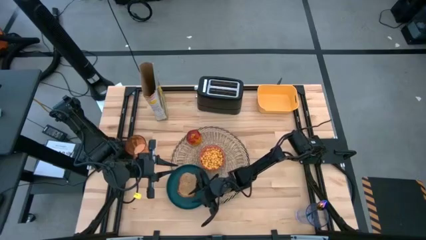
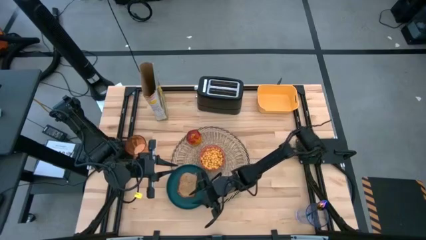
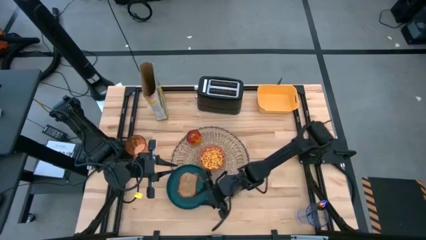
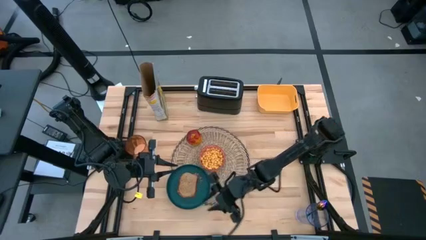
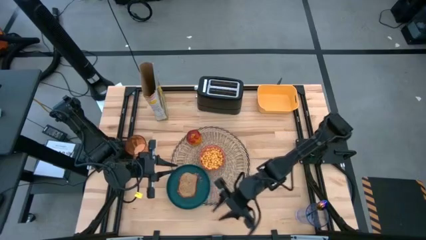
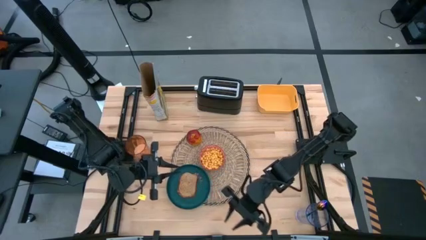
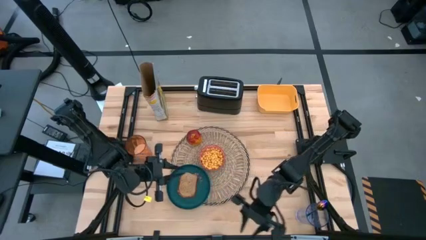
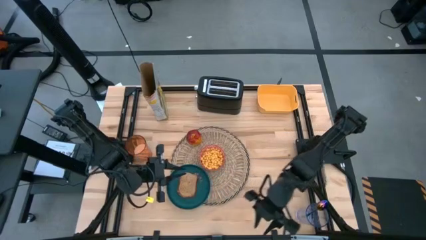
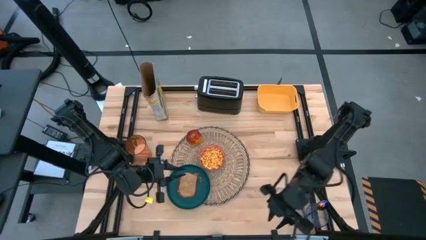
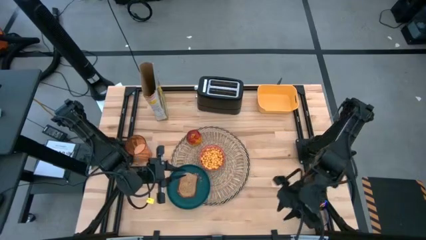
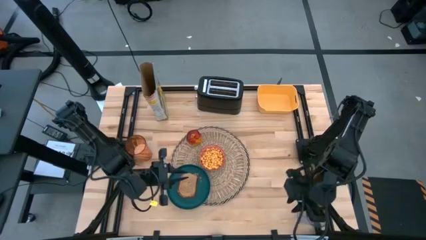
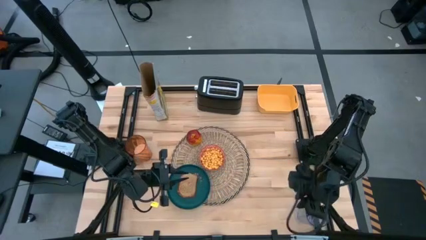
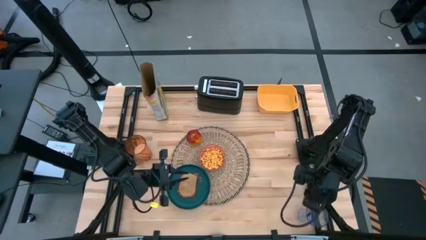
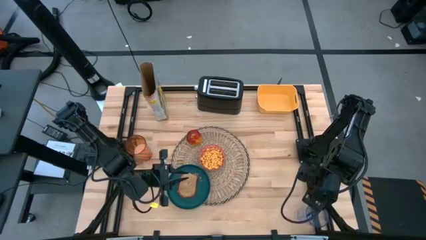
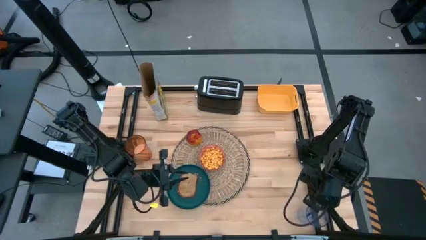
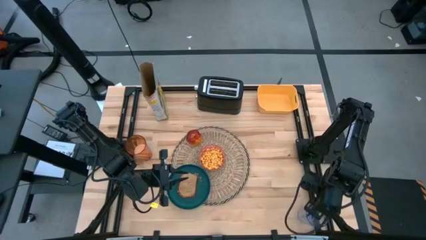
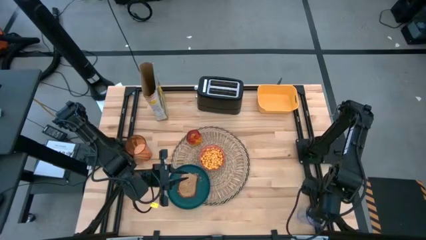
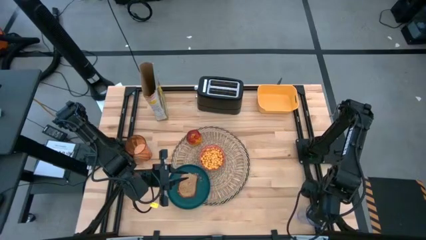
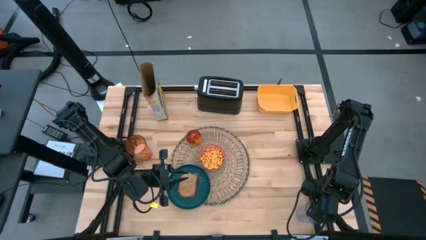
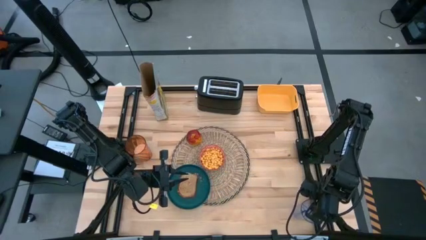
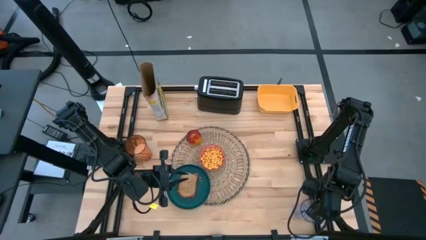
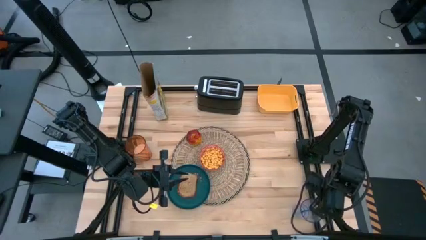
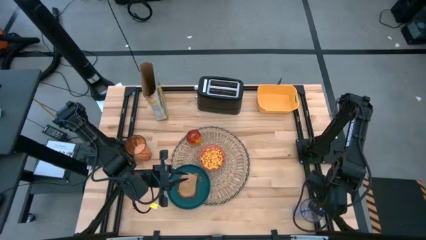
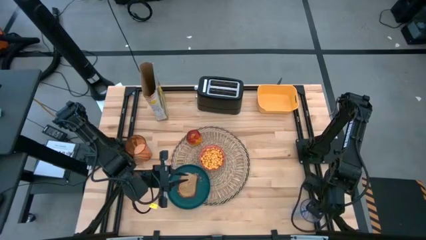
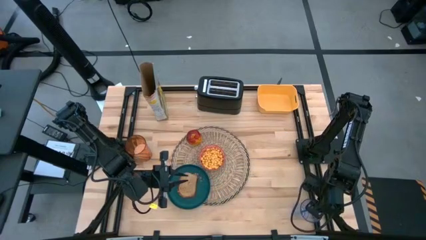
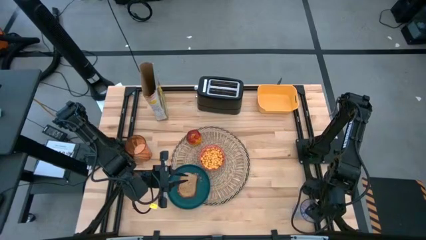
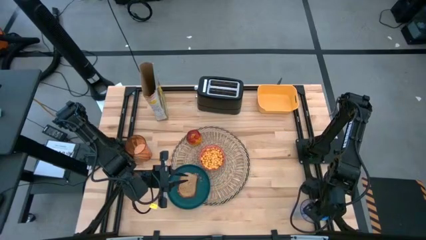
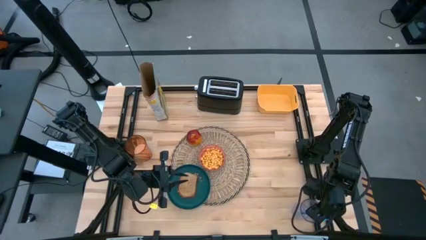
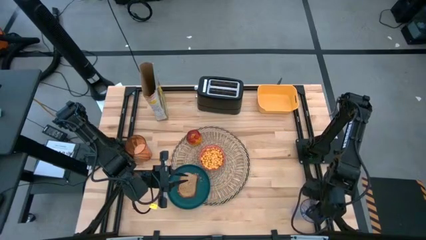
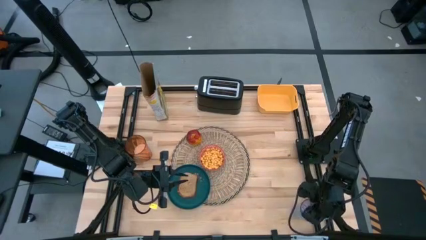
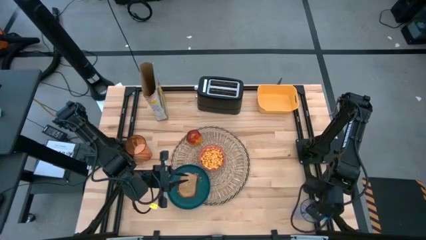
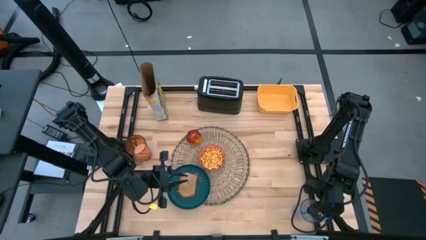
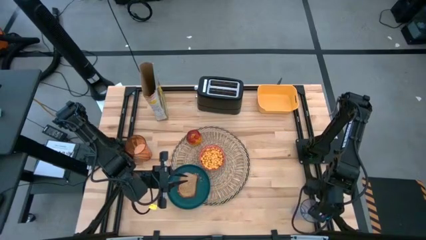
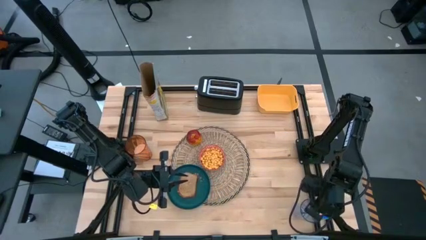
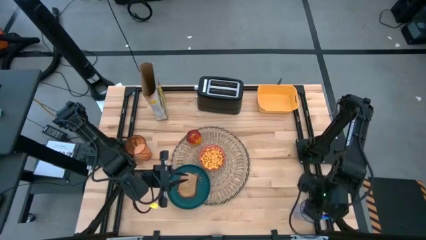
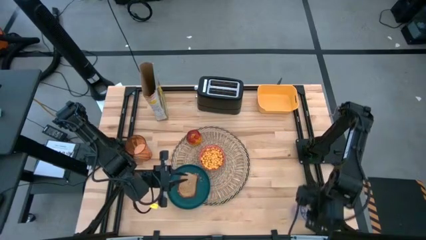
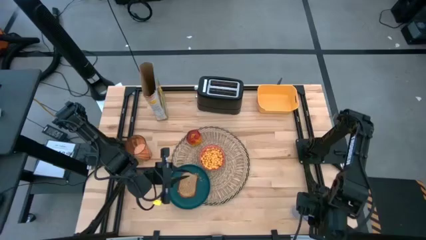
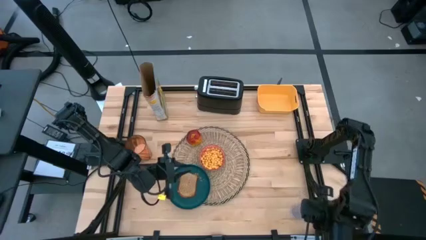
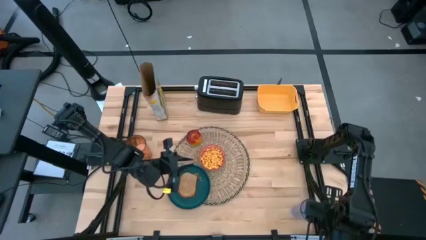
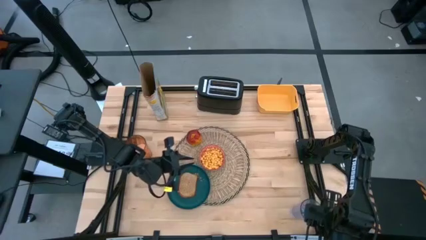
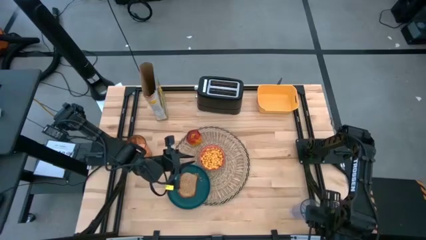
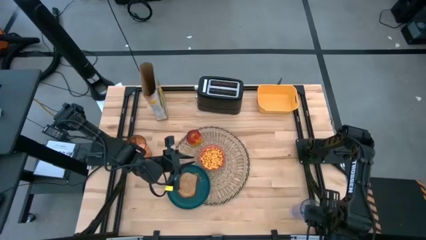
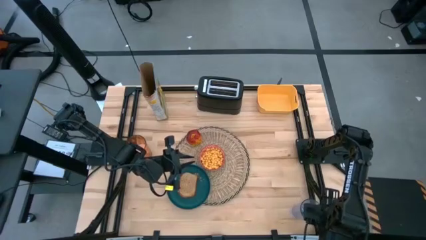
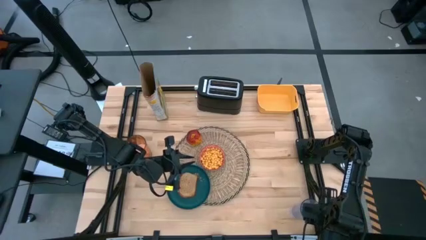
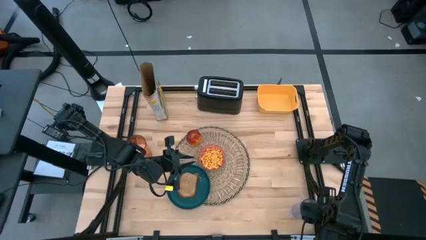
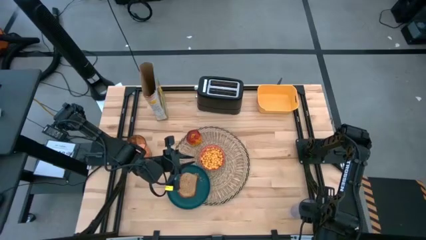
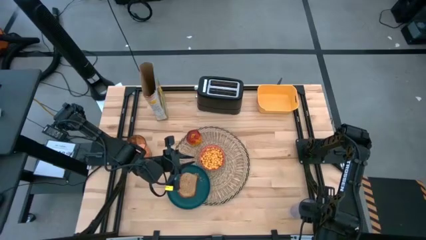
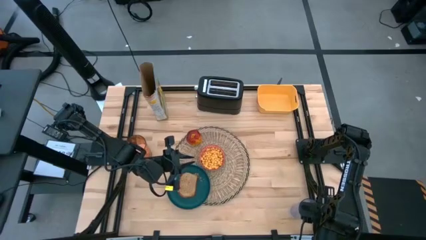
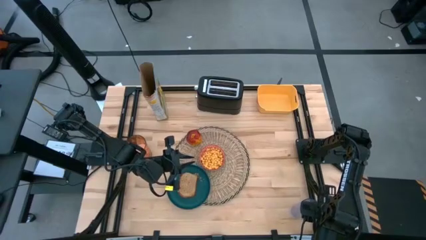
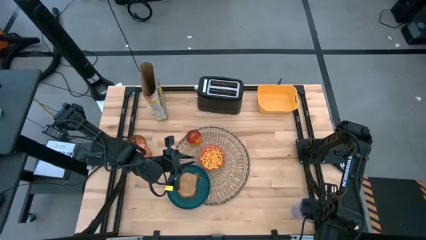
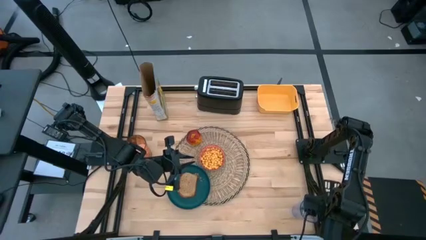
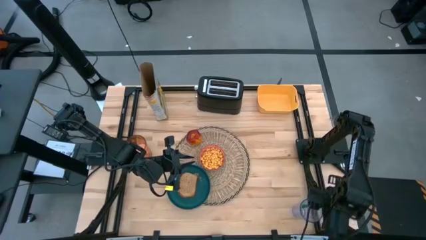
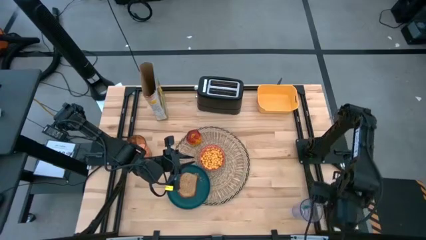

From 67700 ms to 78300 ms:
Task: Arrange a breakfast setting
Put the purple spoon on the brown placemat to the right of the red patterned bowl

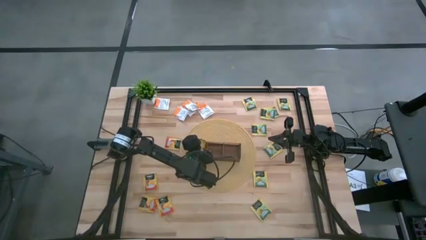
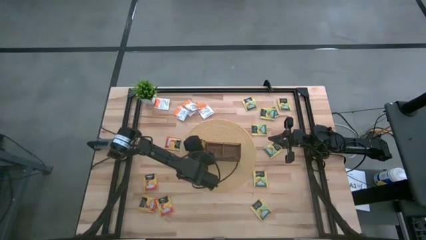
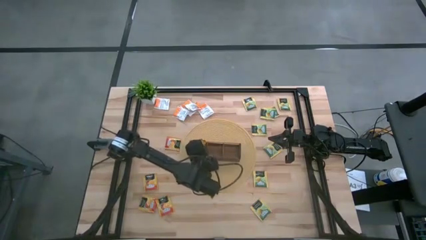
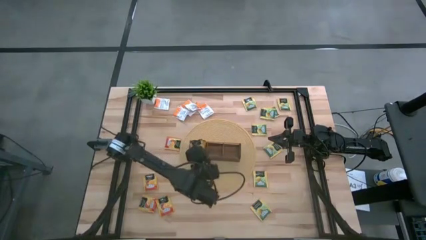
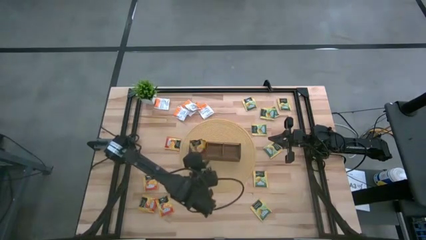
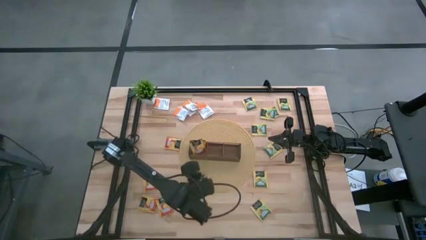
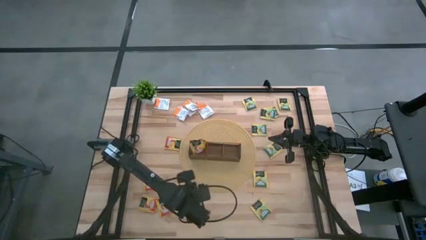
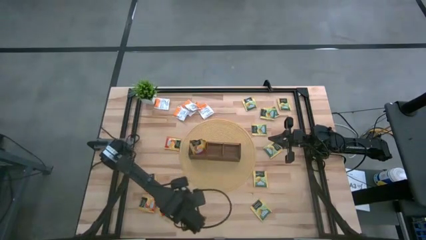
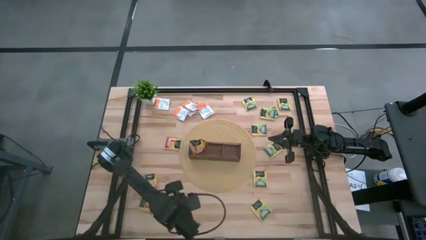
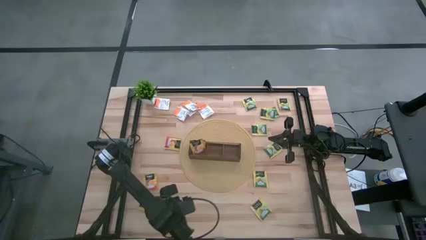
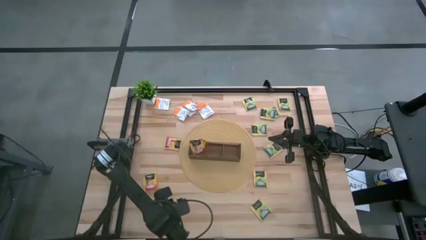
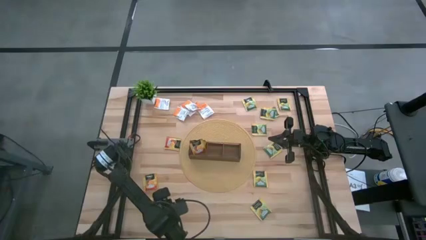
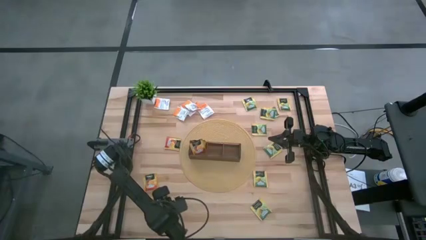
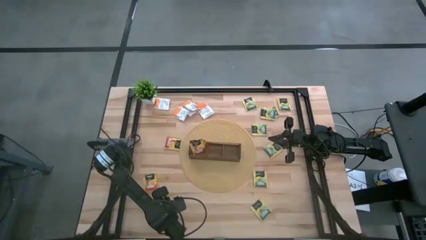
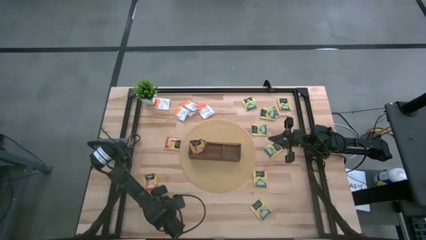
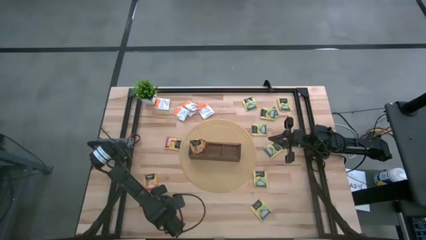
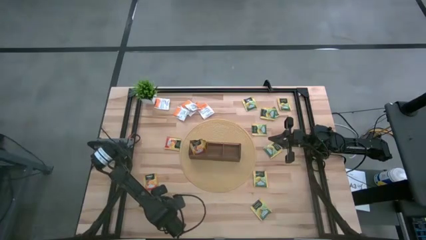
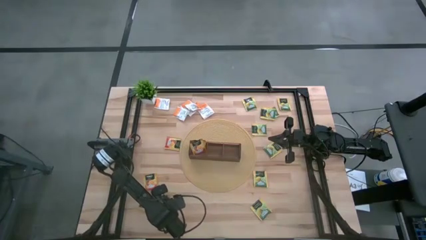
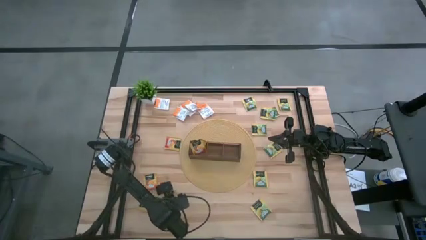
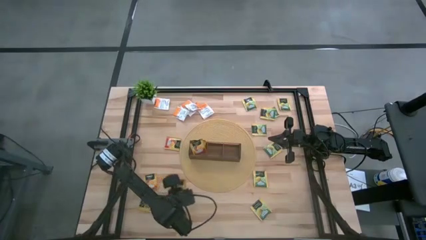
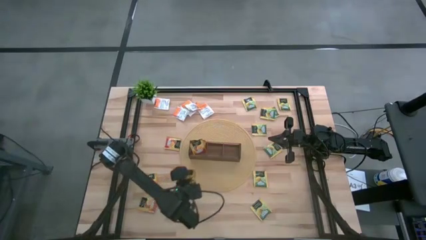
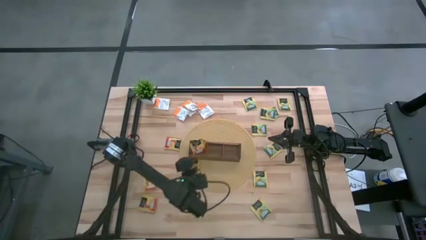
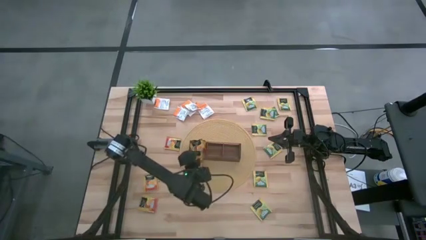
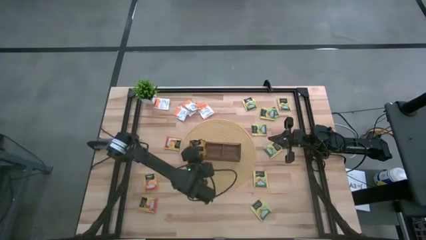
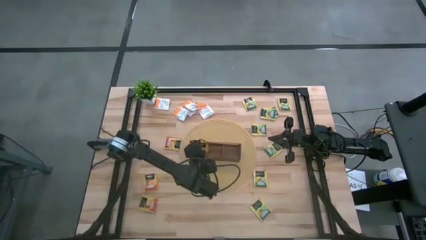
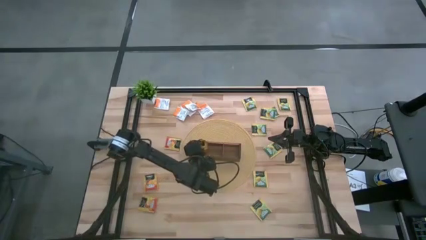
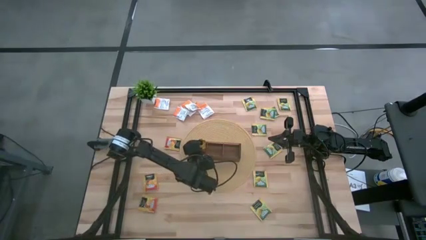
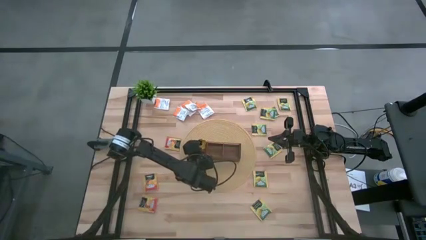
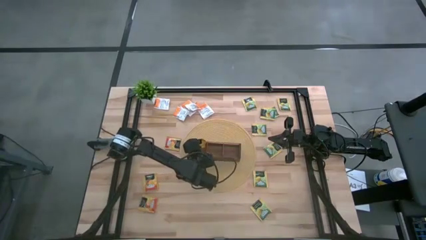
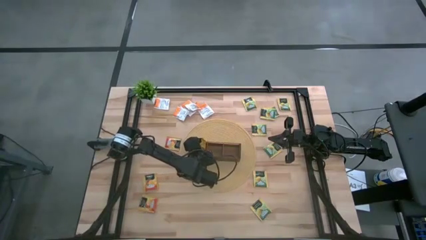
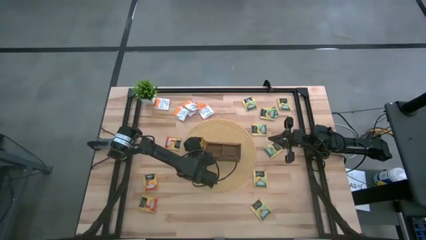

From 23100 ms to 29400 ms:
Task: Pick & Place Tea
Put the mango tea sachet into the left section of the wooden organizer
